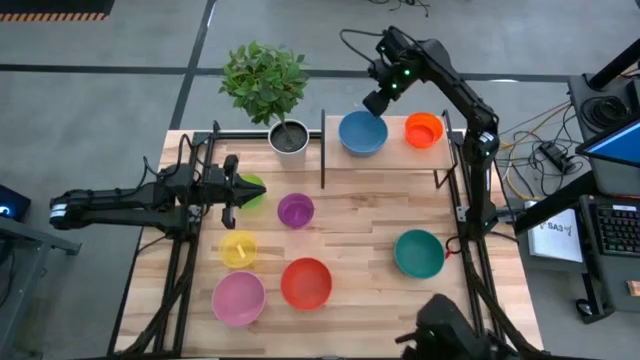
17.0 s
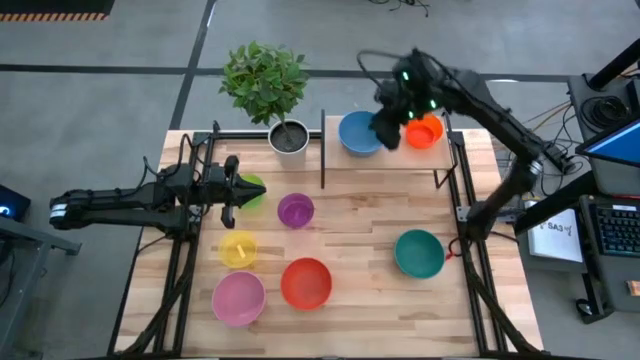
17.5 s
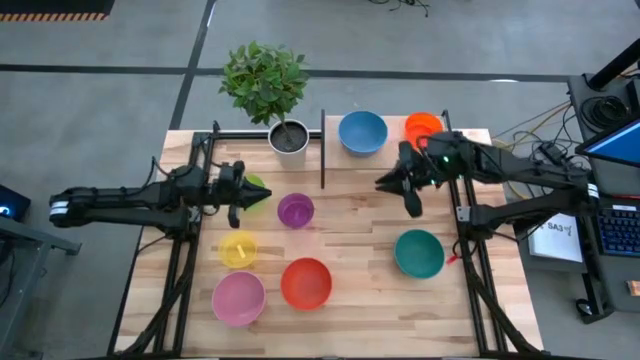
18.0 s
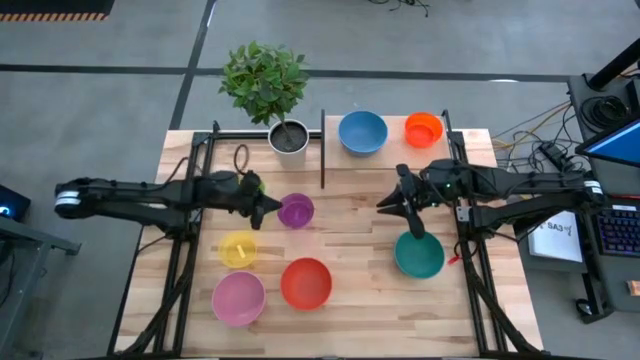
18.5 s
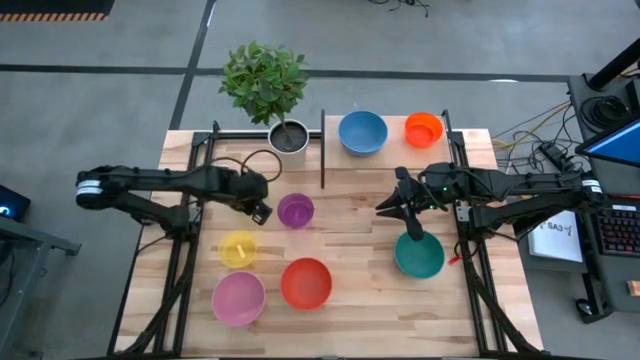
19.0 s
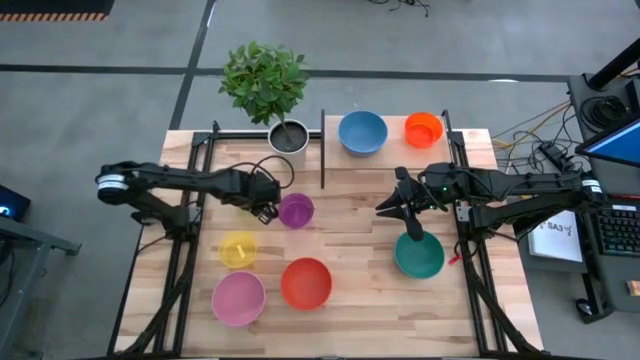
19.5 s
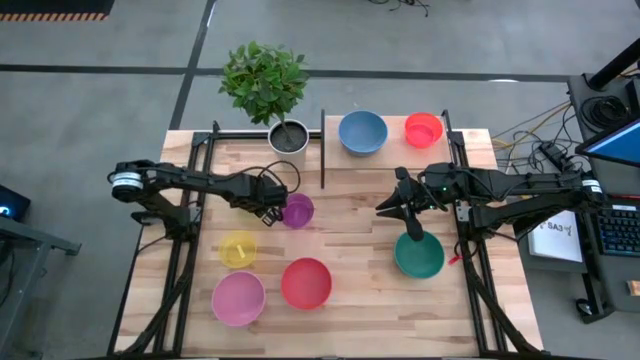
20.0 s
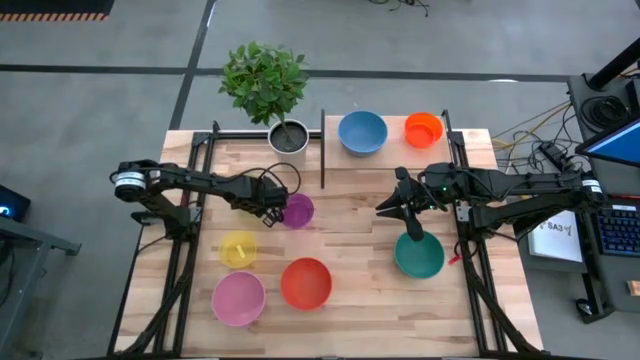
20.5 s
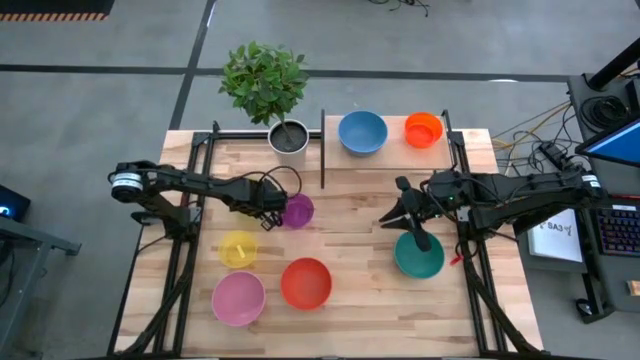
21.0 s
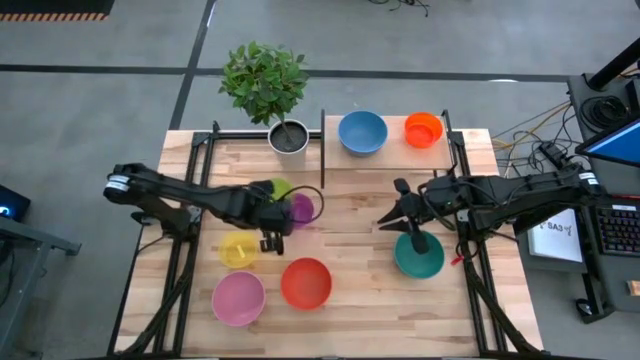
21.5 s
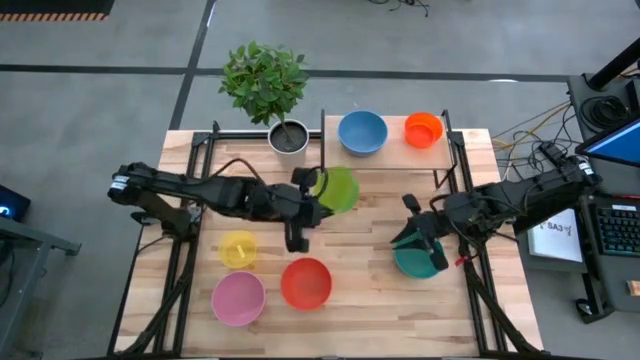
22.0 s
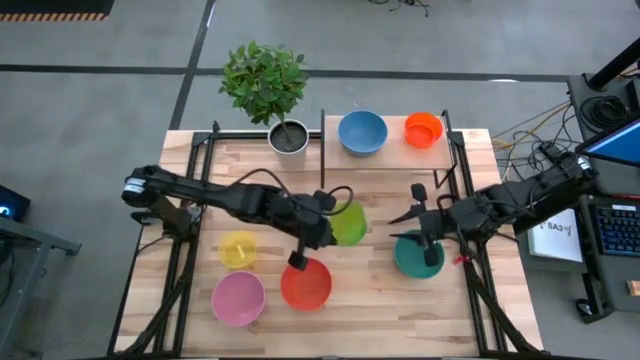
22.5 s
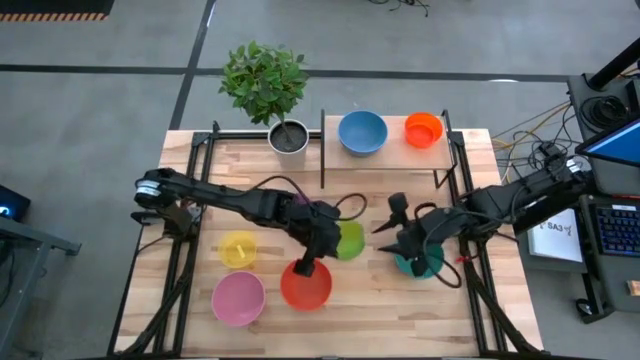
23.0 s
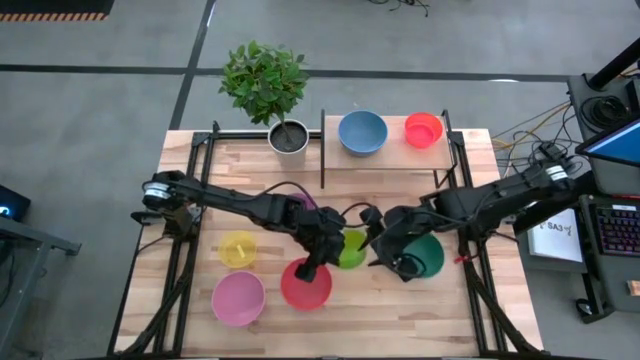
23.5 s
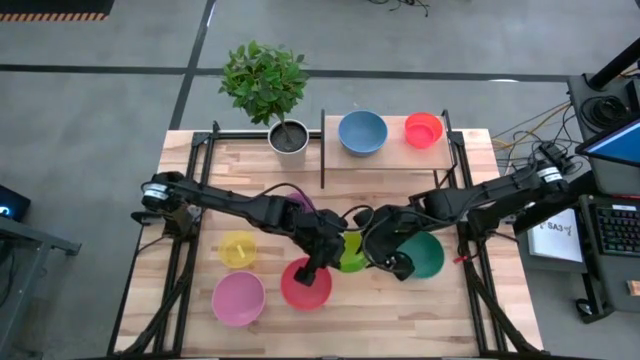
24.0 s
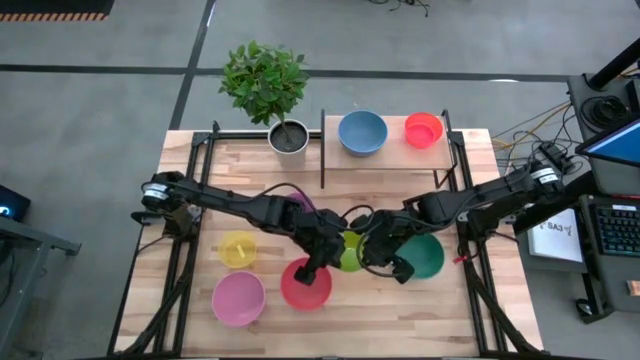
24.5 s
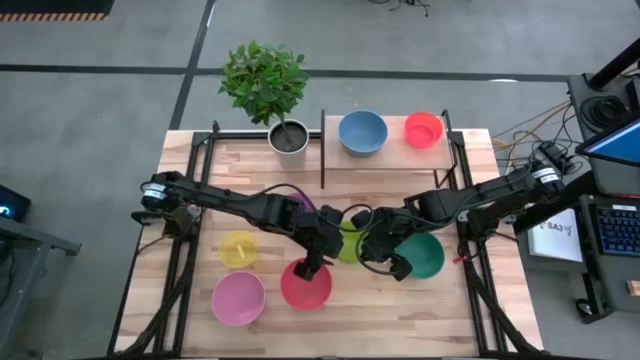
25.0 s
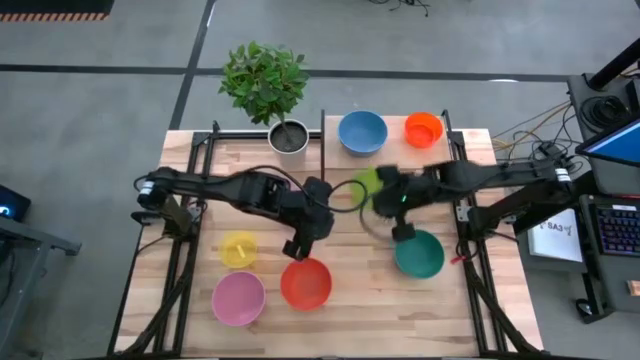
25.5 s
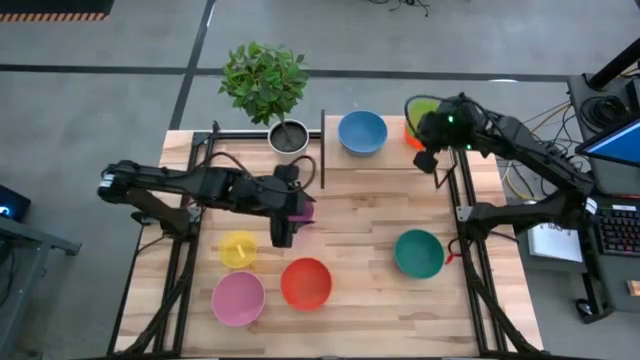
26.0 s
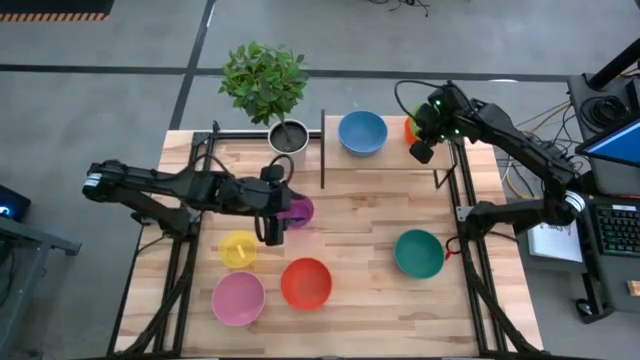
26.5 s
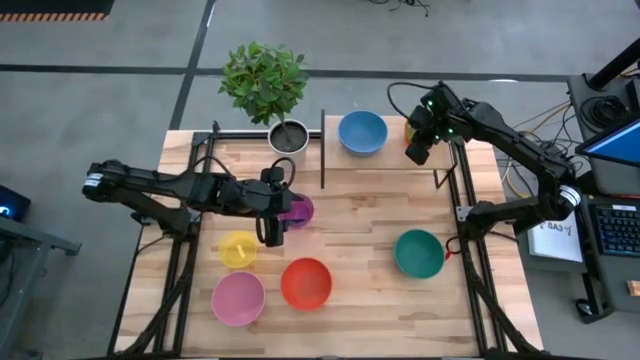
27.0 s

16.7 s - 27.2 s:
Task: Place and stack bowls onto a shelf
Stack the light green bowl on top of the orange bowl on the shelf

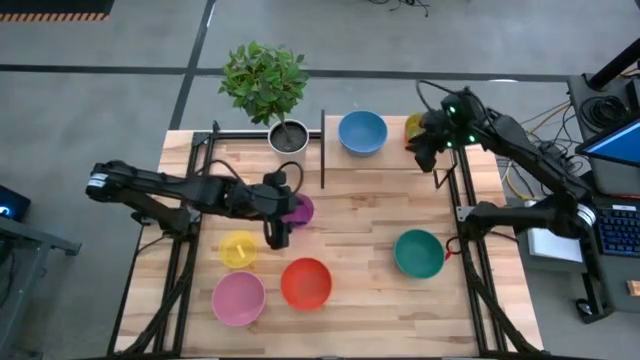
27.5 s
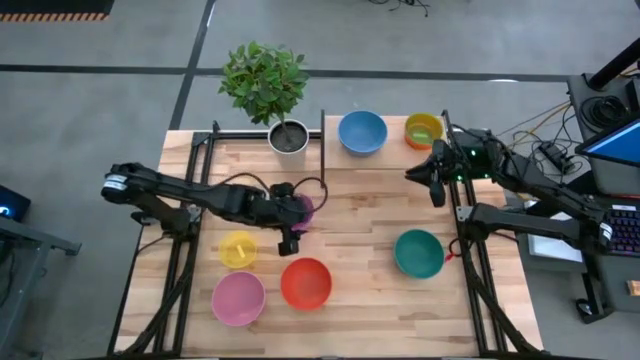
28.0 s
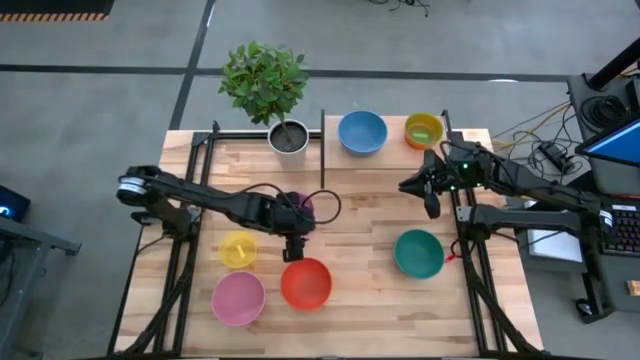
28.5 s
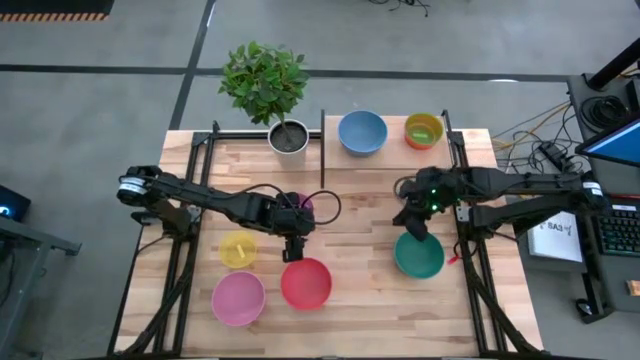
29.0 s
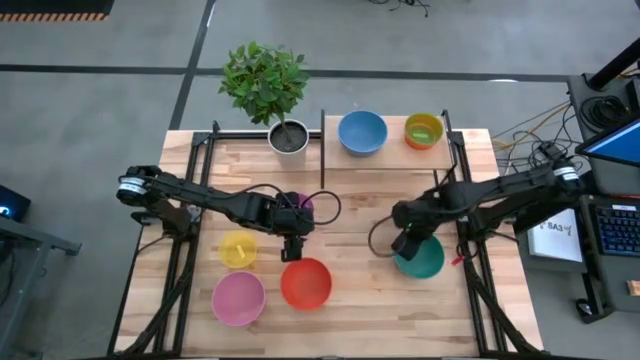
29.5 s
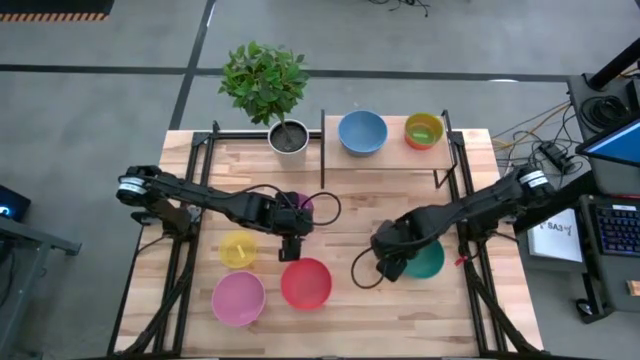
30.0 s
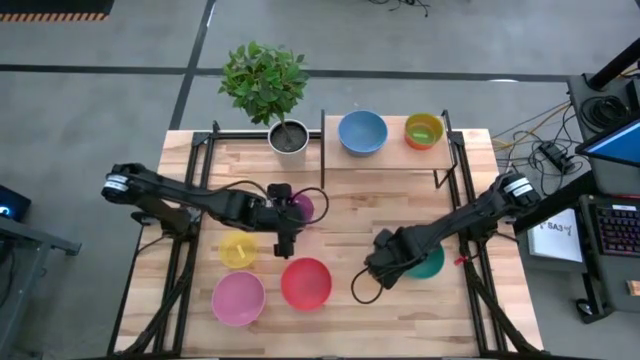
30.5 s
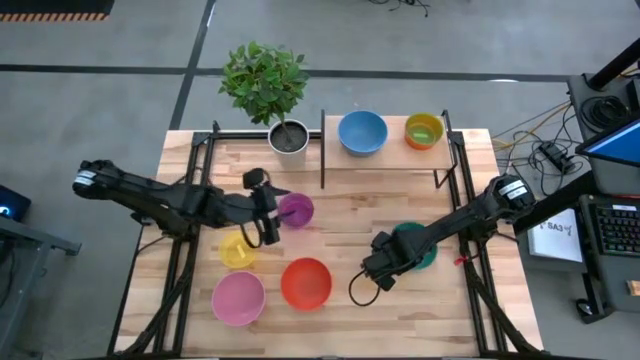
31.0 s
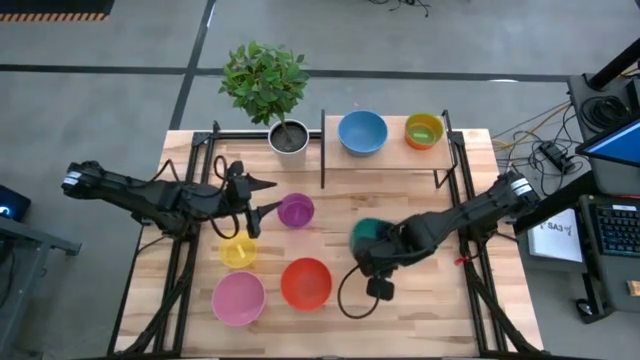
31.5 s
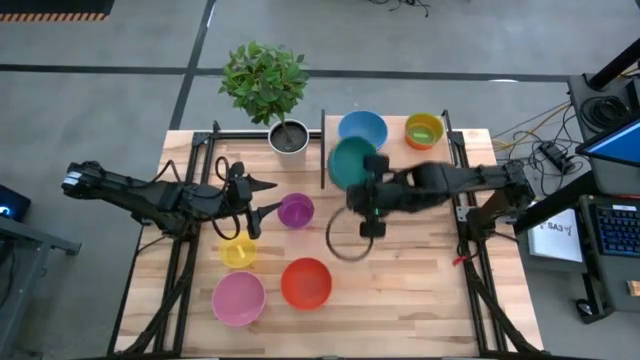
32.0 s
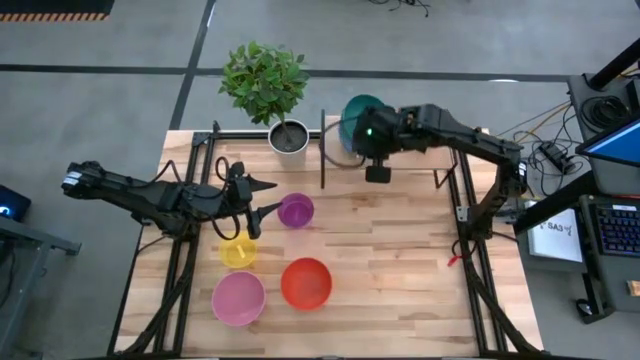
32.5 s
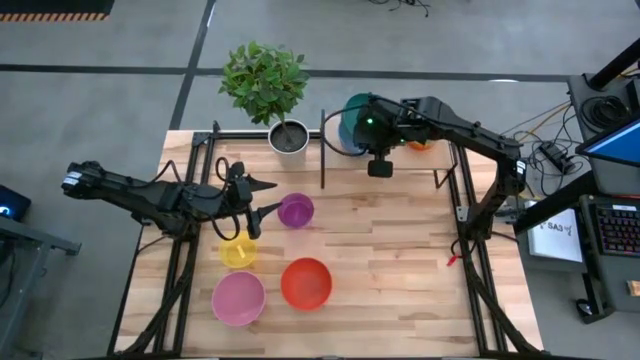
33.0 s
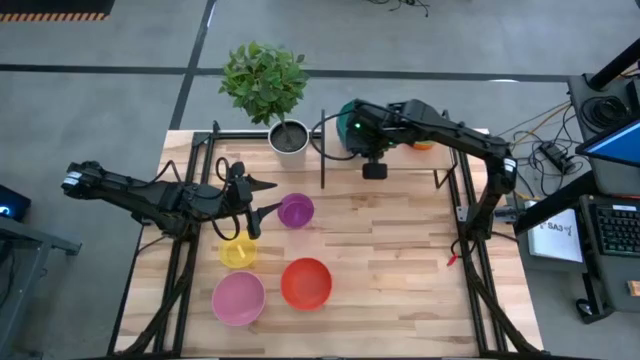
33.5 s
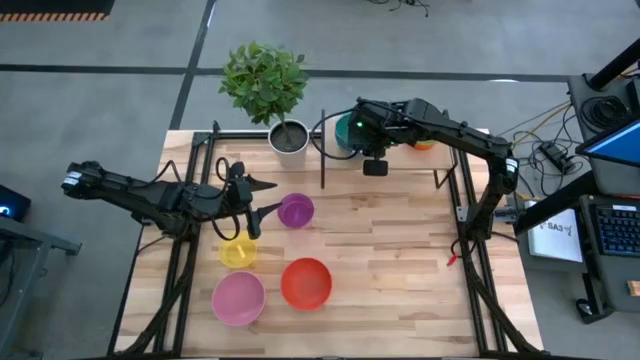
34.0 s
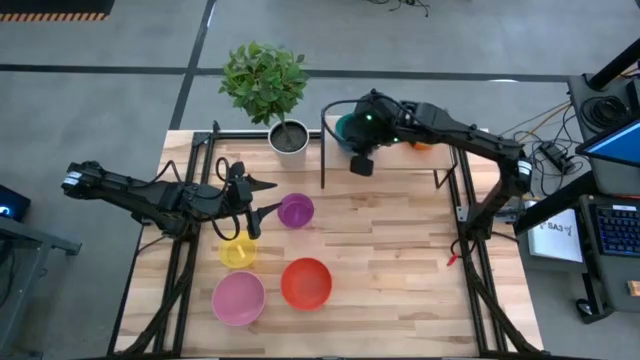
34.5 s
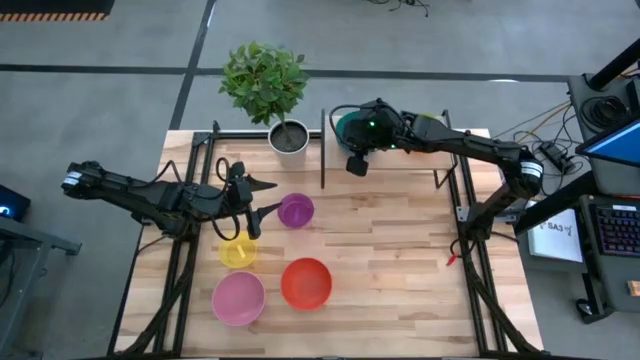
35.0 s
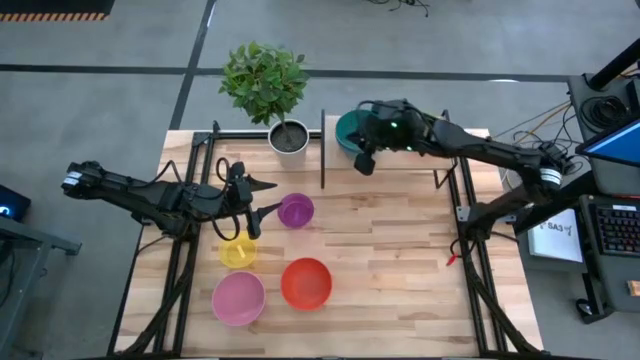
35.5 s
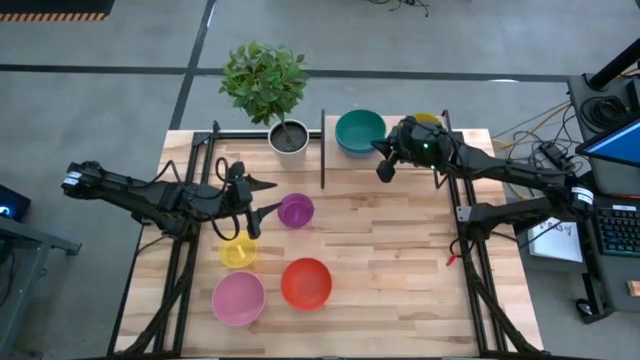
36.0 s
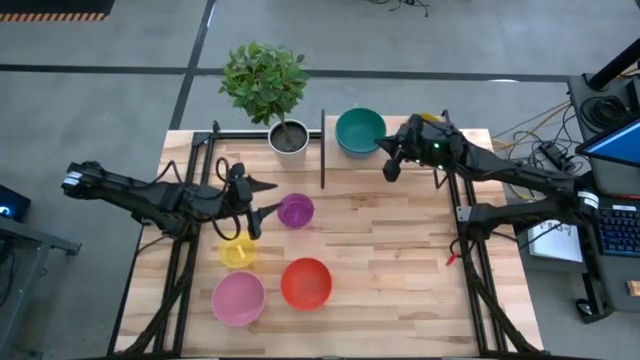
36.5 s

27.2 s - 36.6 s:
Stack the green bowl on top of the blue bowl on the shelf

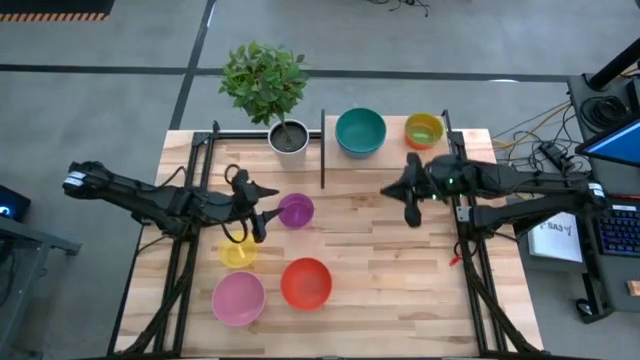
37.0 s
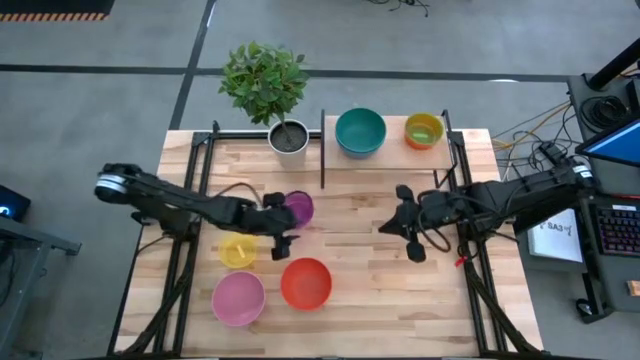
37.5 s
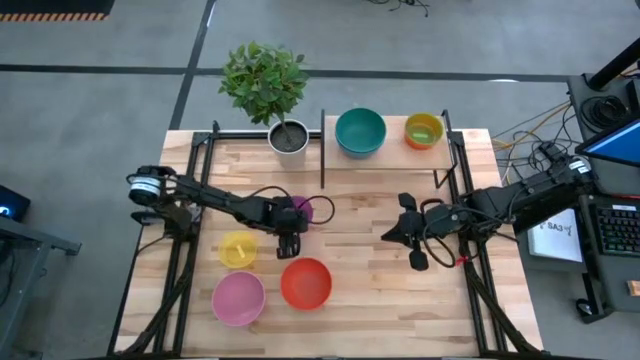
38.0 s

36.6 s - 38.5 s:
Stack the purple bowl on top of the green bowl on the shelf

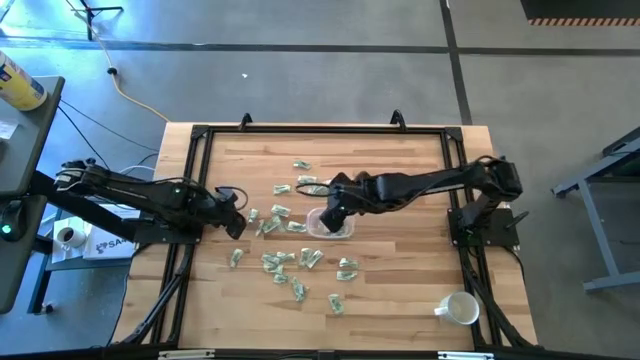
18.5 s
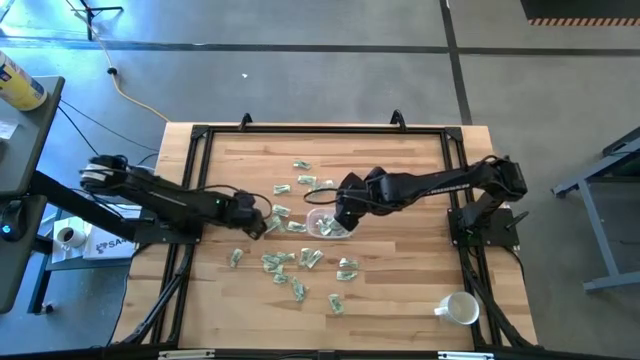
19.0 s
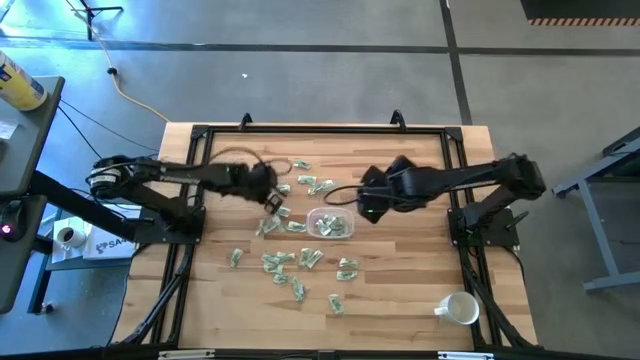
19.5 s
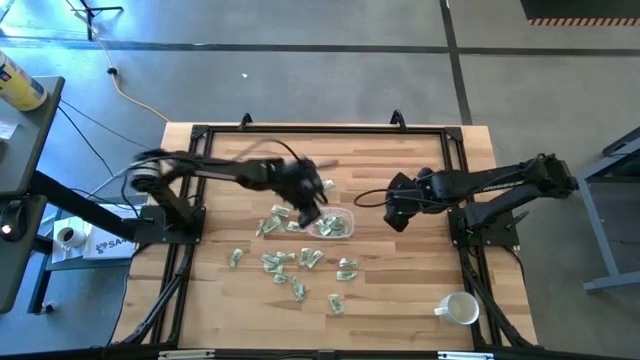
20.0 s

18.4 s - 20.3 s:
Task: Pick and place Stevia / Truvia into bins
Put the stevia packet into the transparent container
